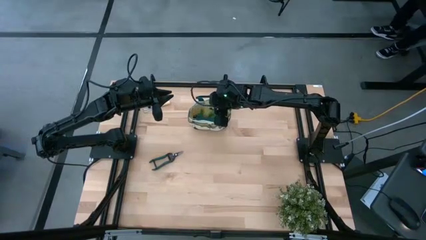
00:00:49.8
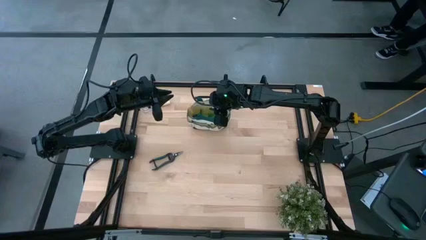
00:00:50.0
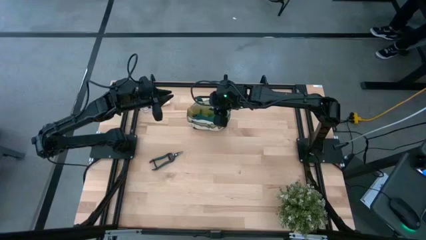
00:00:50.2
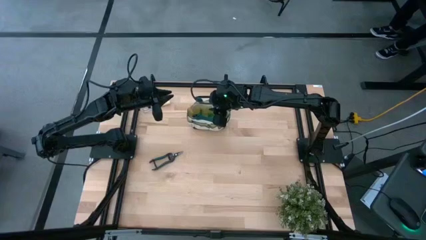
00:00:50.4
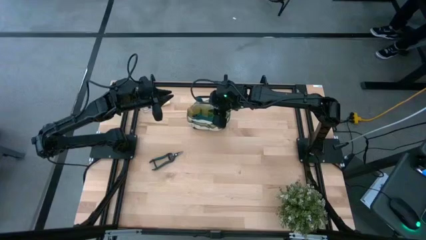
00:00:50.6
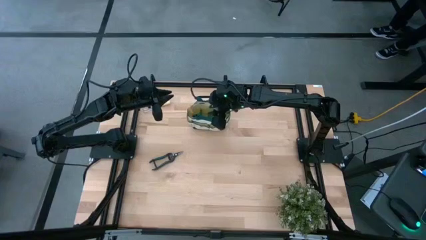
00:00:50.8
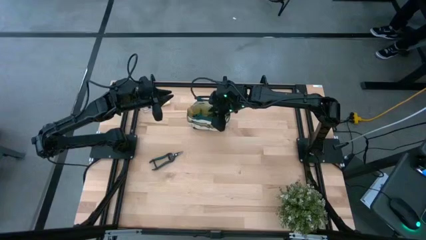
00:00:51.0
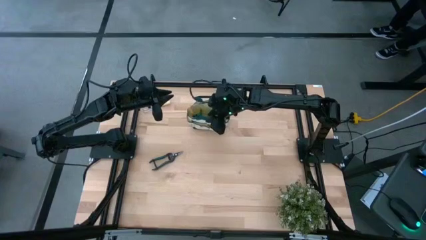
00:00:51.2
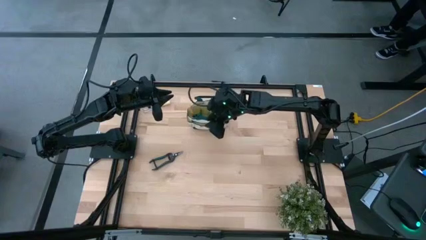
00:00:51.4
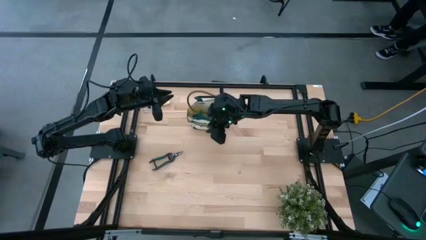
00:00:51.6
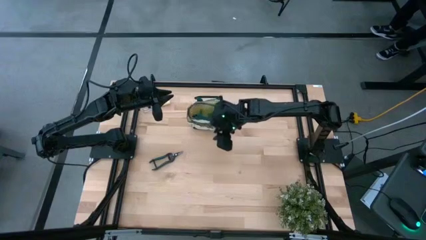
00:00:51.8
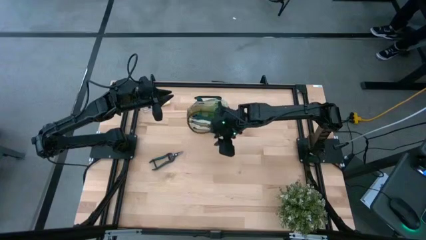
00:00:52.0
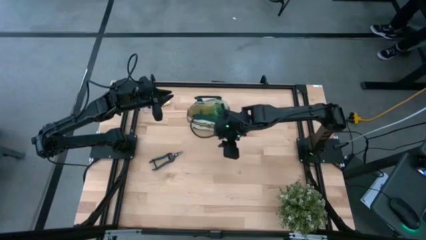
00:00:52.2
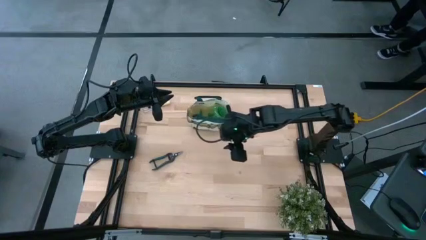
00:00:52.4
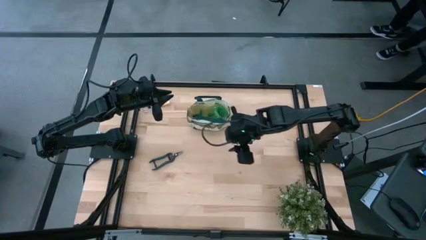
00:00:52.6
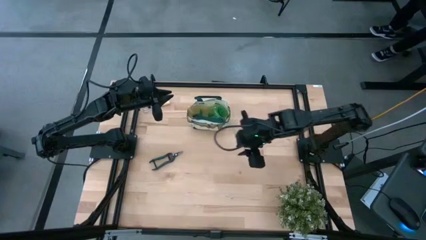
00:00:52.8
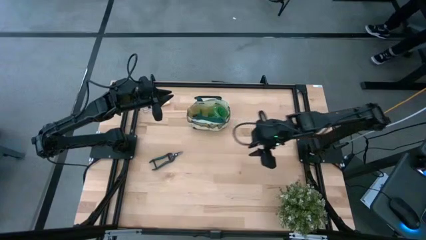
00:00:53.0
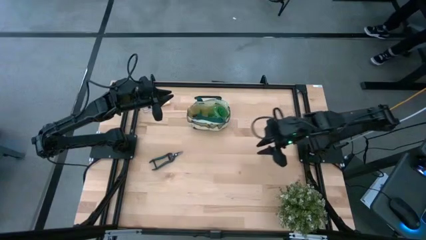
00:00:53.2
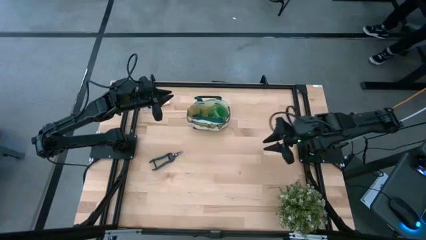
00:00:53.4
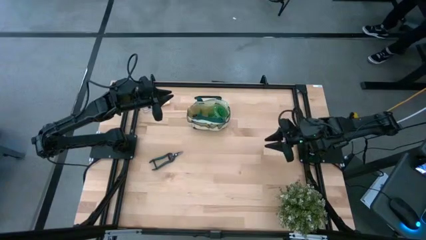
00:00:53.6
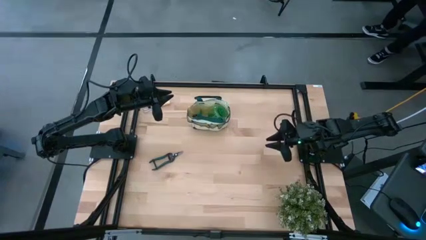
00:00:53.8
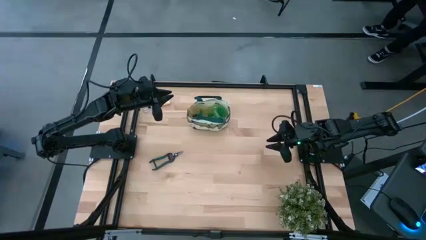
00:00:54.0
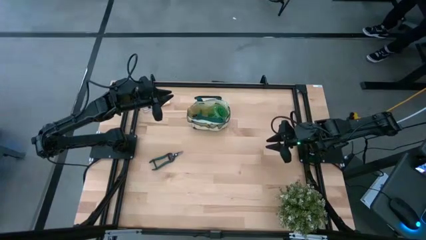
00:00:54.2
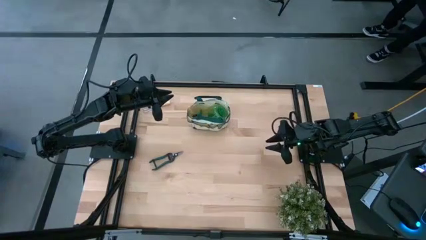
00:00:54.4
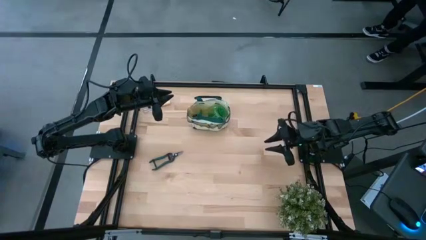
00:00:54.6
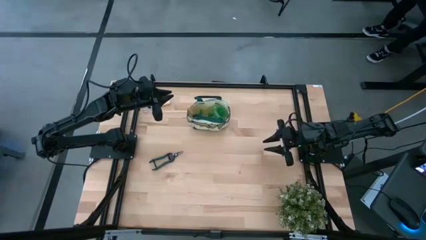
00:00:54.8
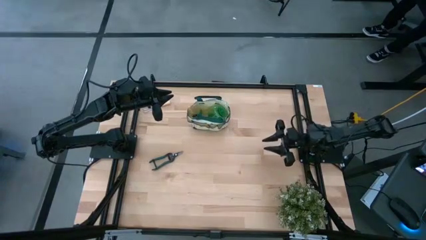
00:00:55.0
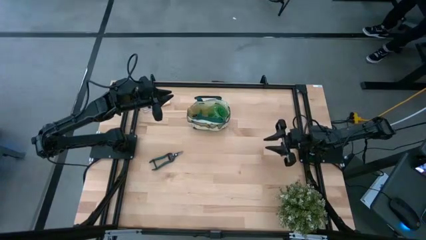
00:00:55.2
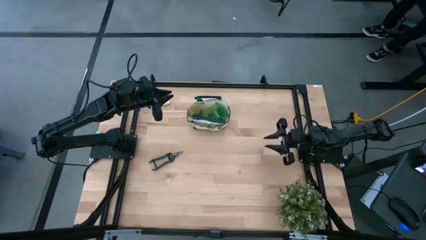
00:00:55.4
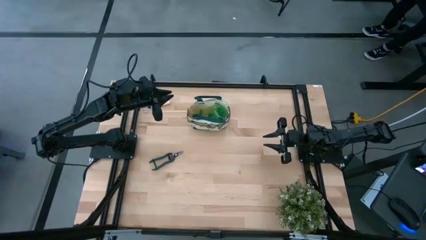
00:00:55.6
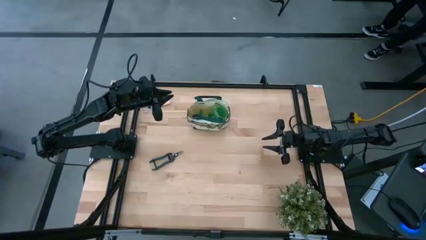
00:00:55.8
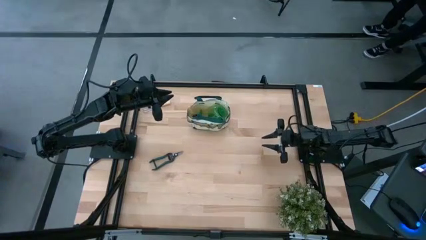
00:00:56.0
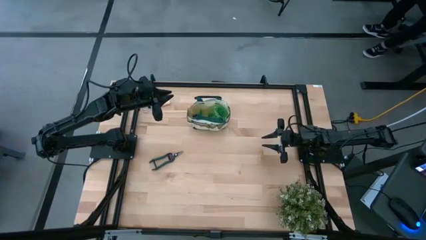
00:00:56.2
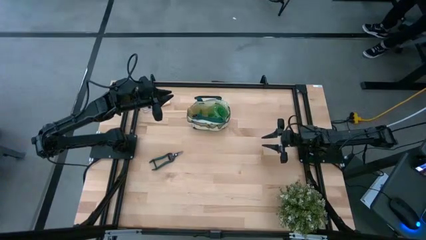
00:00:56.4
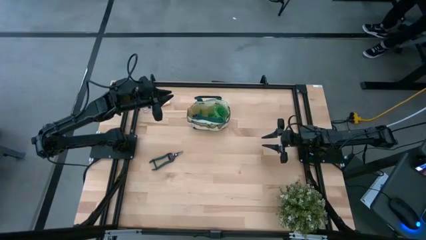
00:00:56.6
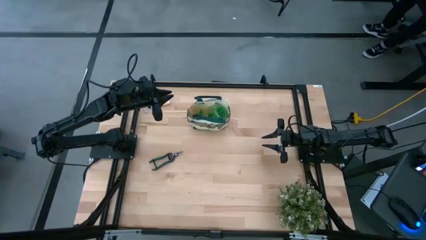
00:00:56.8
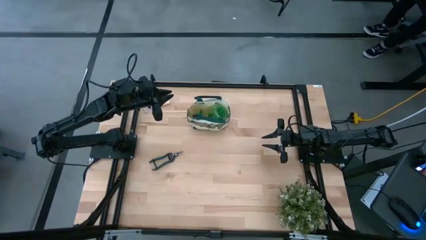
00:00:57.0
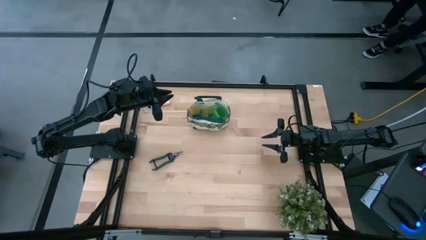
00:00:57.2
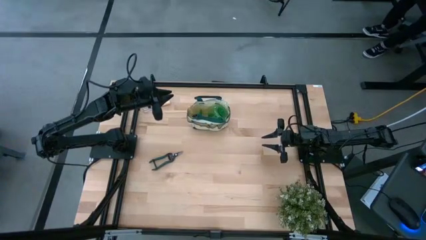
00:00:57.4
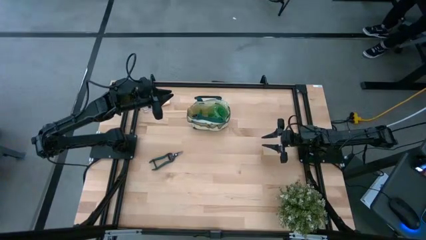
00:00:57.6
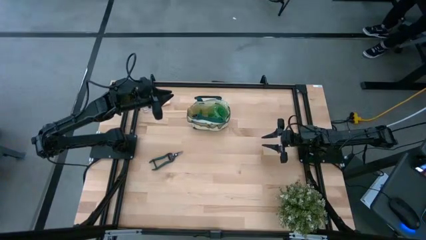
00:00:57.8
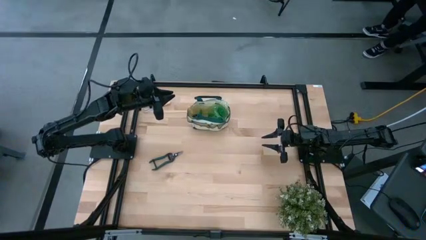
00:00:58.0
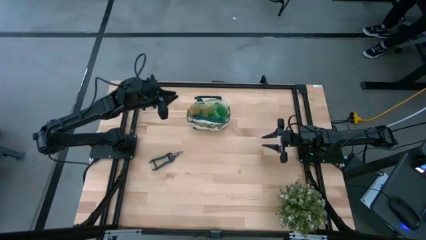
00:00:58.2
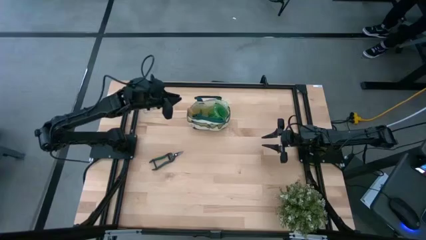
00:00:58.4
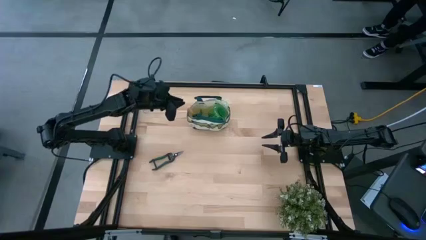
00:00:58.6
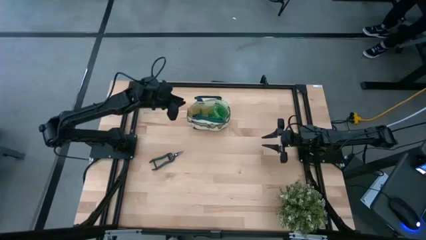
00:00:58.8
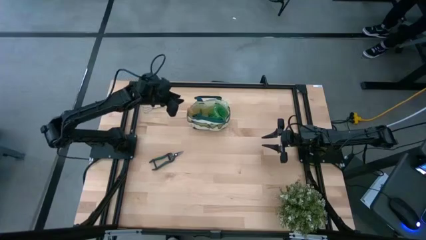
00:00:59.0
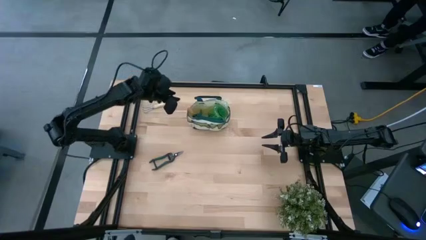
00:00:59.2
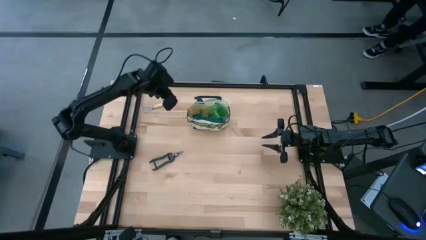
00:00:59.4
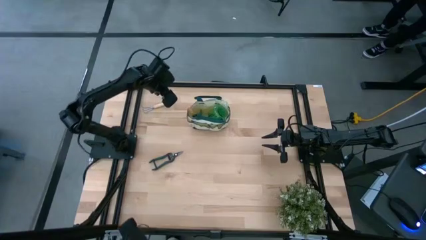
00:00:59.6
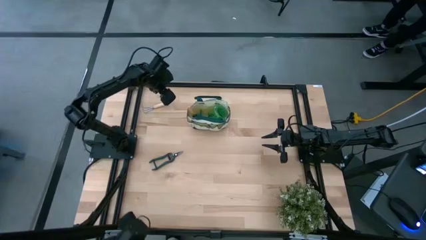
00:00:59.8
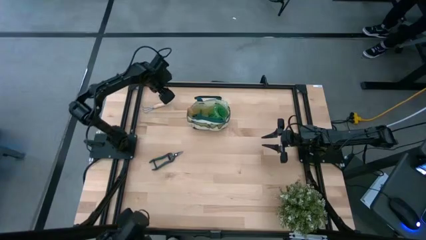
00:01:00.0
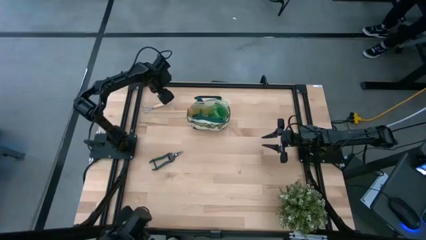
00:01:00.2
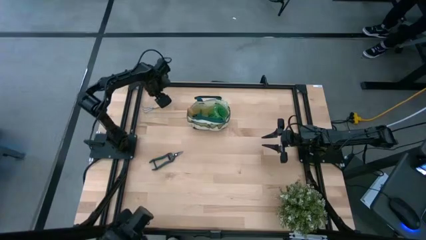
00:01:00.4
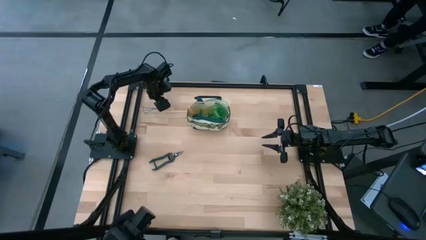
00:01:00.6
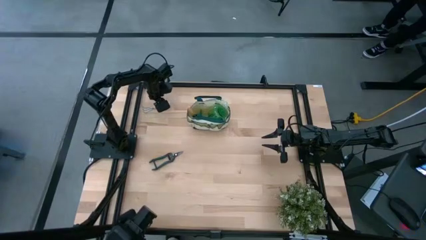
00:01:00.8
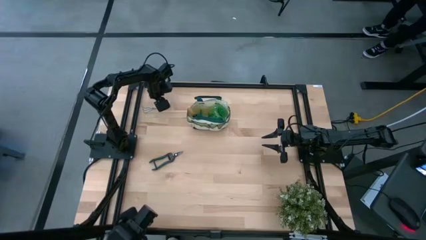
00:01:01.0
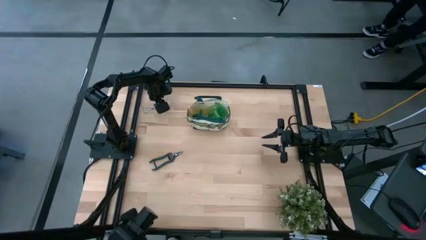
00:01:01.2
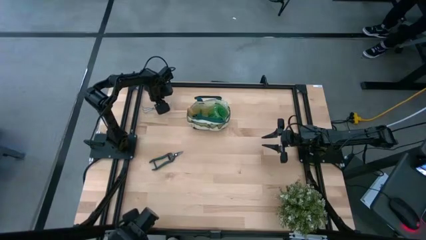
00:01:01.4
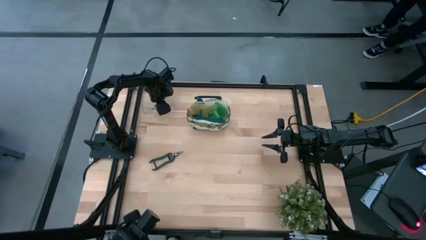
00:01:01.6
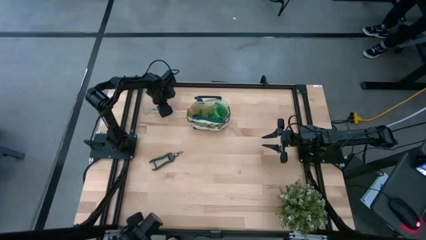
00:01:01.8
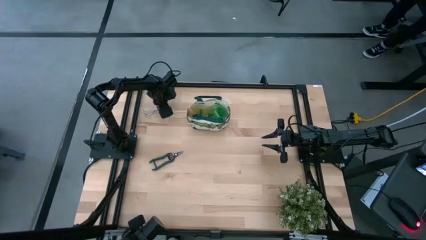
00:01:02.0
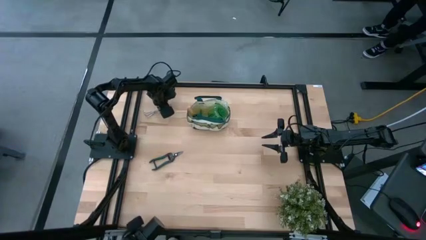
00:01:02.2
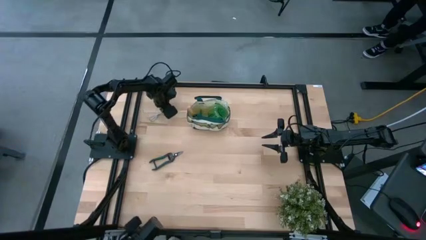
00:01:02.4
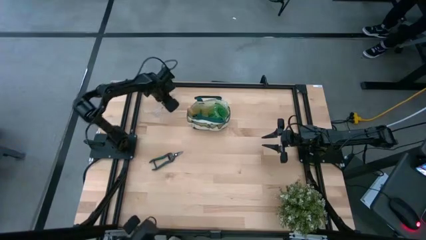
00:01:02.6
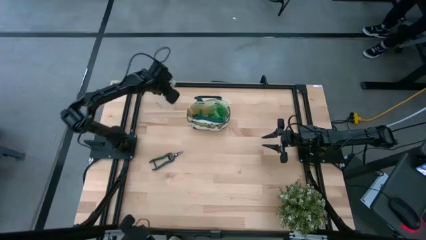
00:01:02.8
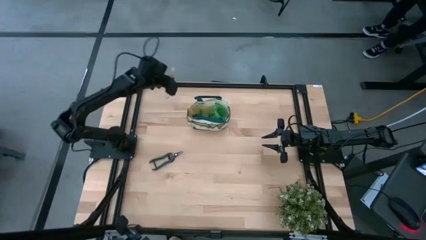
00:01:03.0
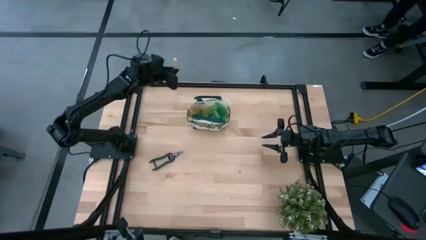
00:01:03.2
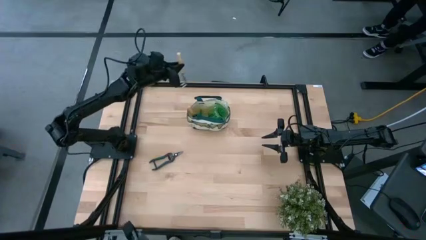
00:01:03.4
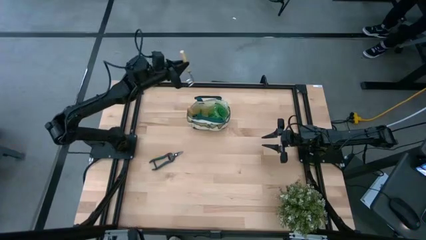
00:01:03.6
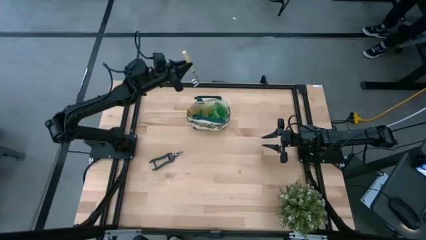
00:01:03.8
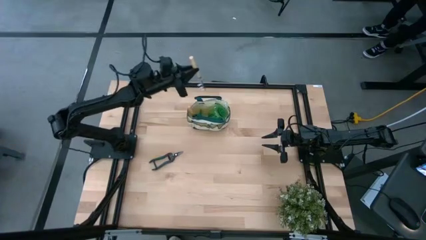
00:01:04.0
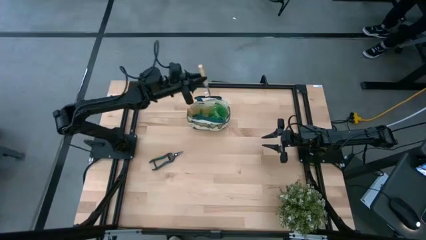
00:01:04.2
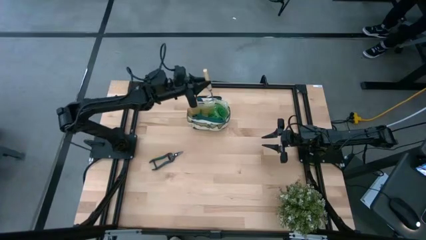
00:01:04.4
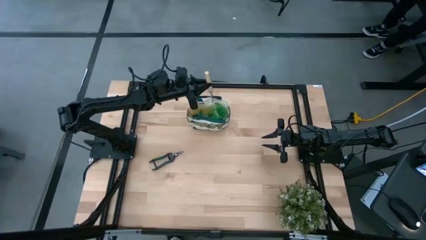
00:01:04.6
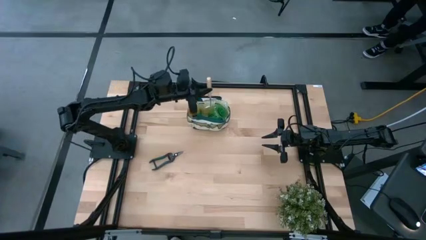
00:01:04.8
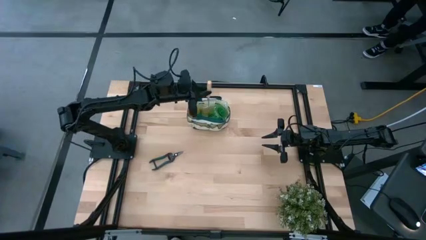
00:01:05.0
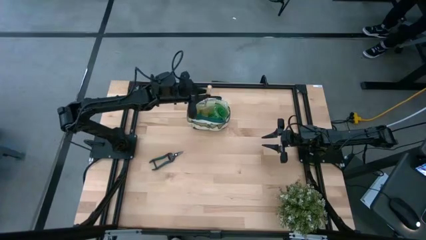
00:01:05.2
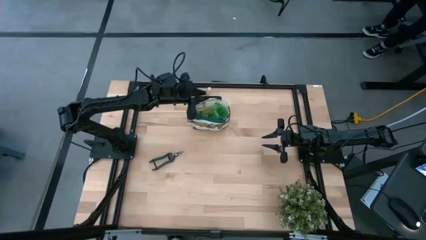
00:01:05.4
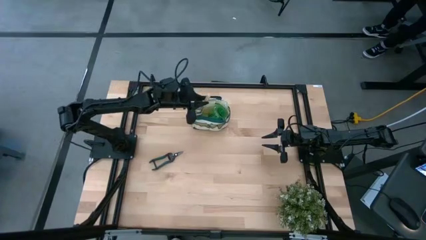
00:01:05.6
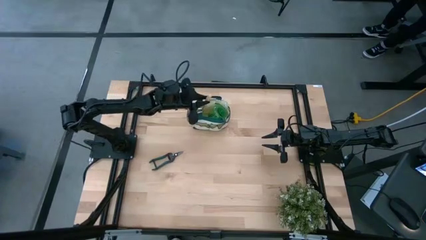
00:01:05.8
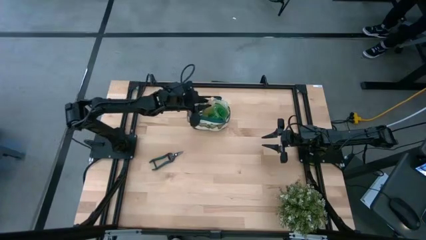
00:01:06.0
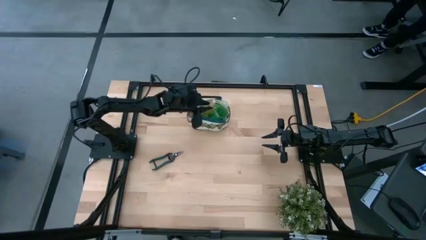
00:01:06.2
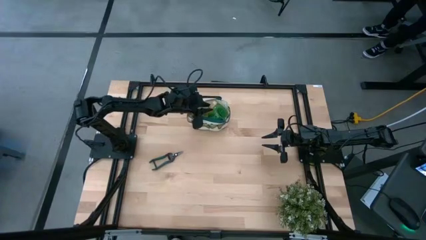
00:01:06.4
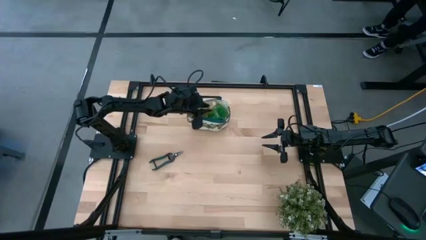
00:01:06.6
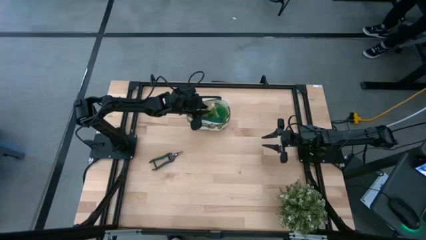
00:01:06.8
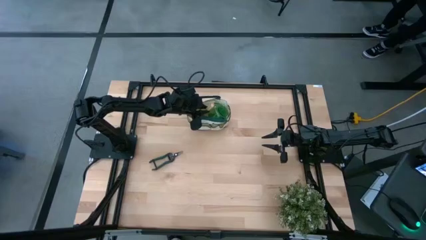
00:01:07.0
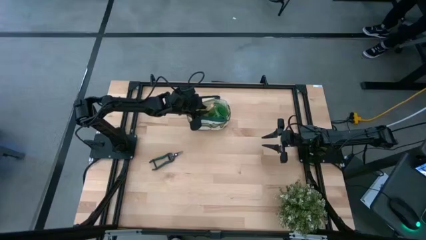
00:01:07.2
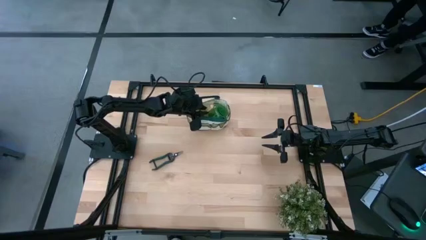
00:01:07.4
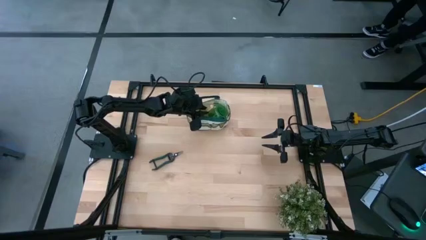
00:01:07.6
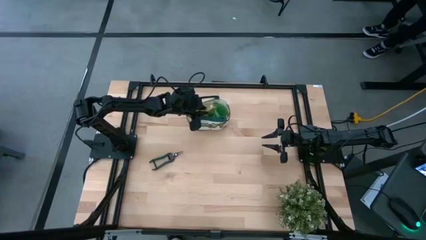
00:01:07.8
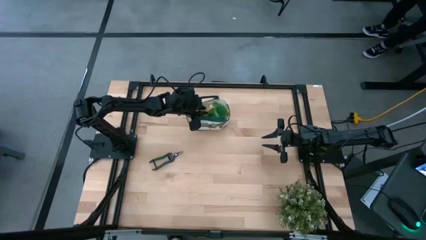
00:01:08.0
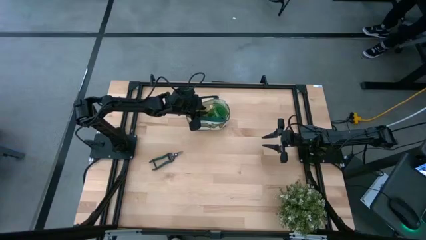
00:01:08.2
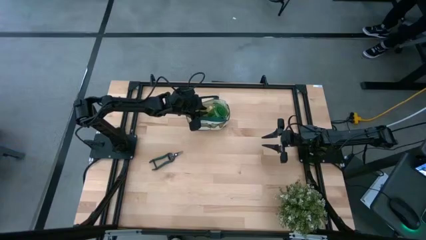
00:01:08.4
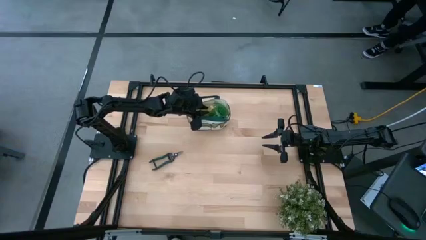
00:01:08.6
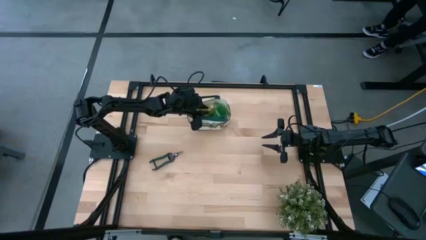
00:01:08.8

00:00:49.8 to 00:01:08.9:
Task: Pick & Place Garden tools in Gardening bag
Put the brown hand rake into the gardening bag
